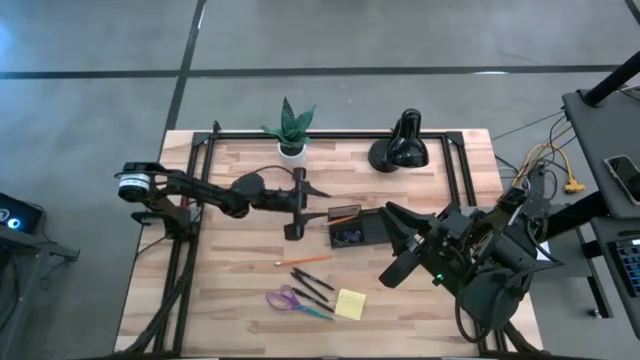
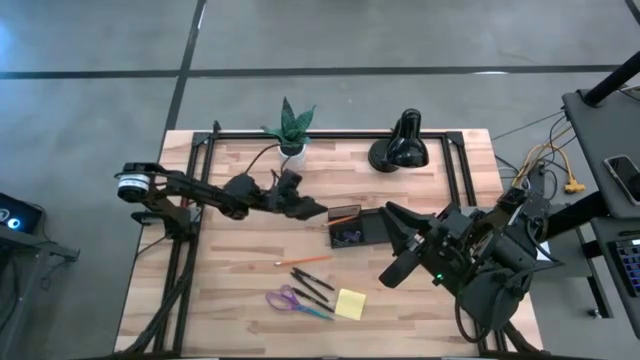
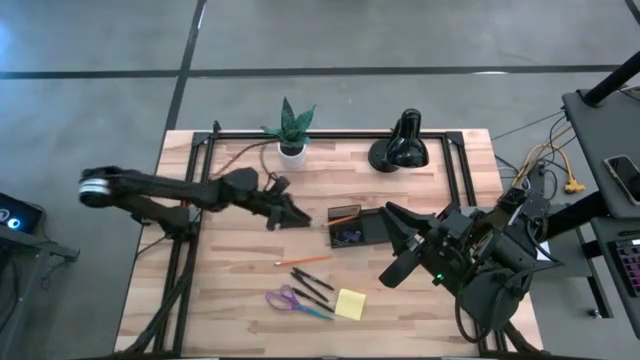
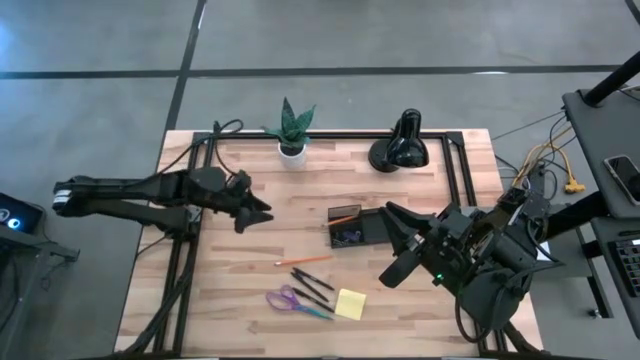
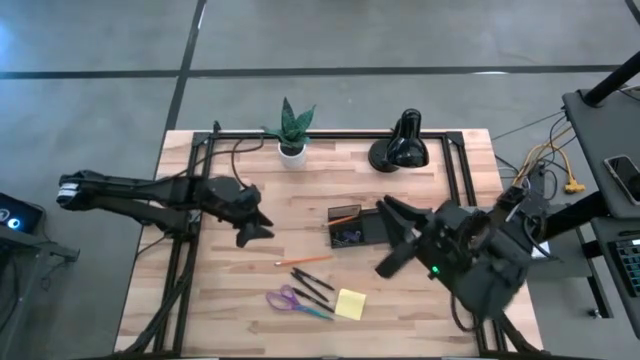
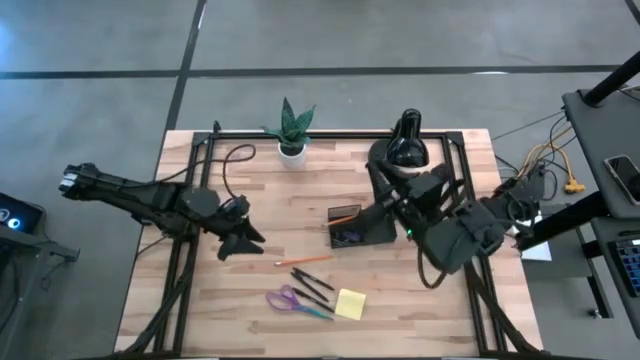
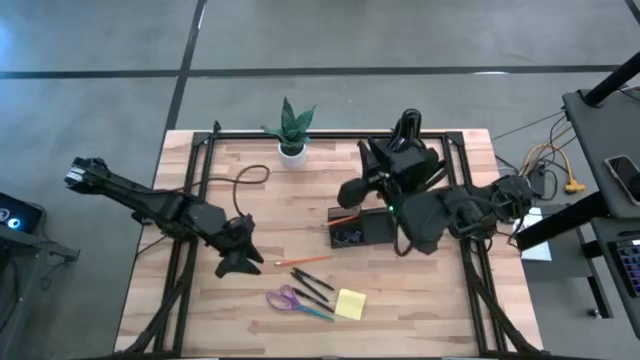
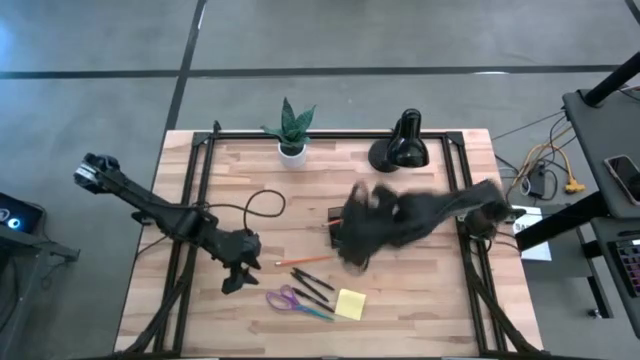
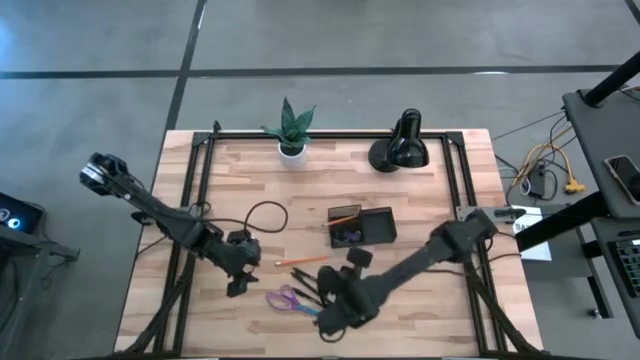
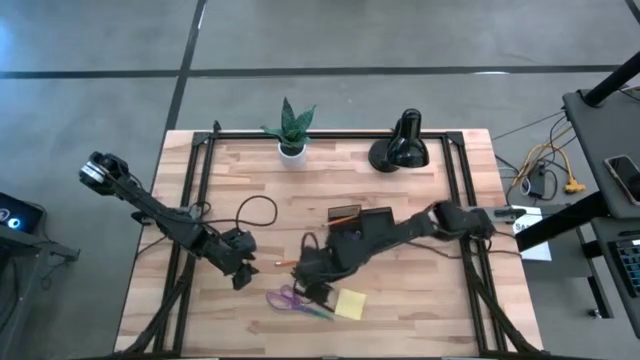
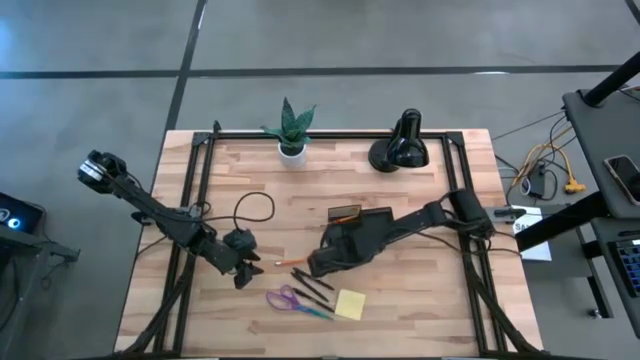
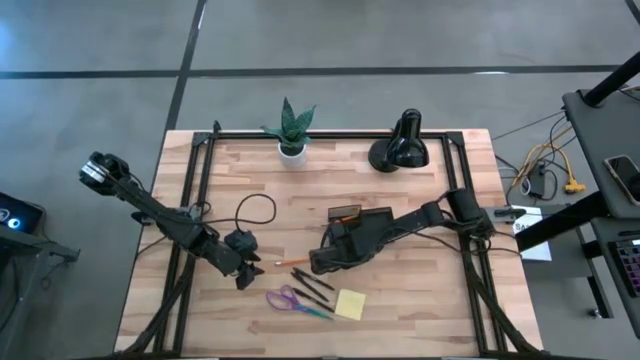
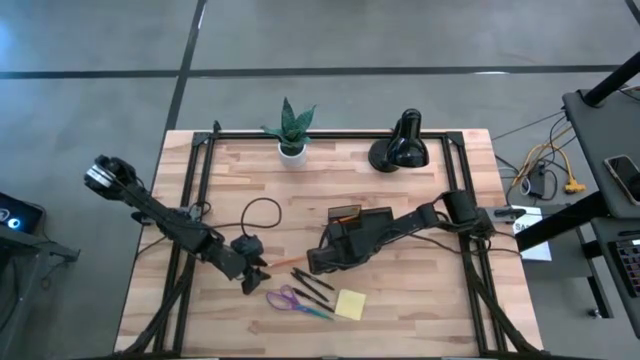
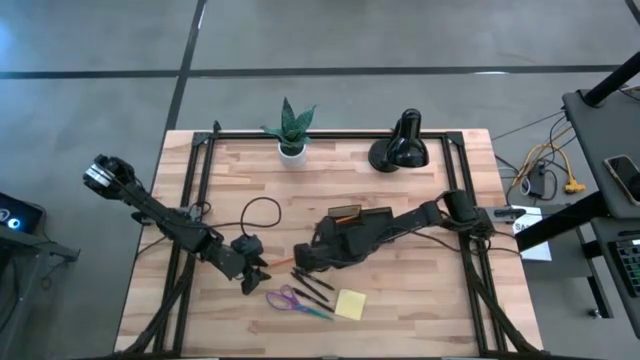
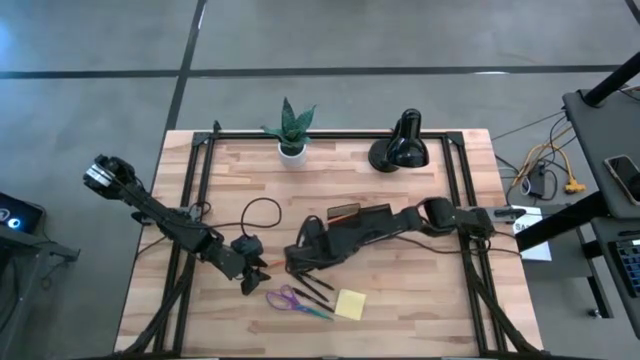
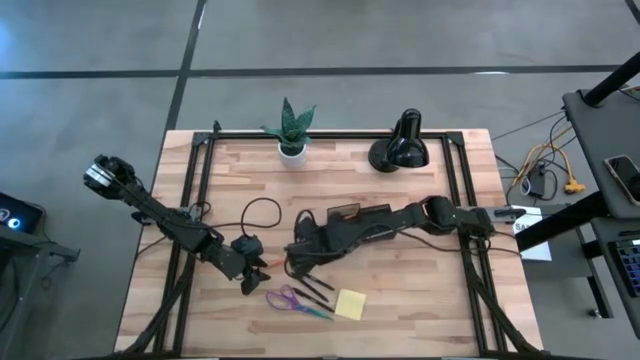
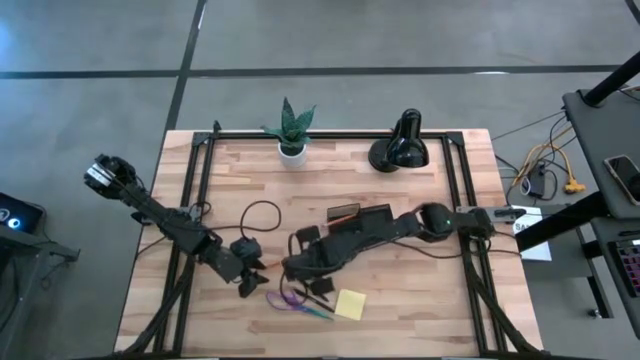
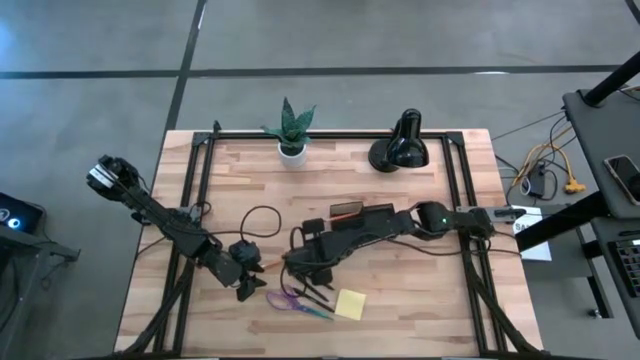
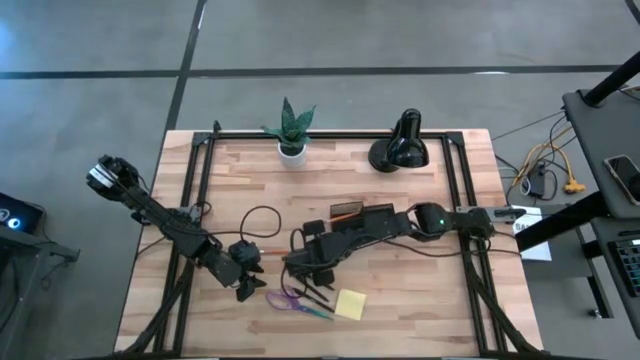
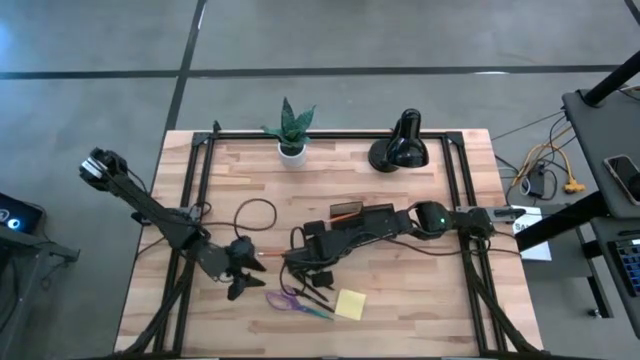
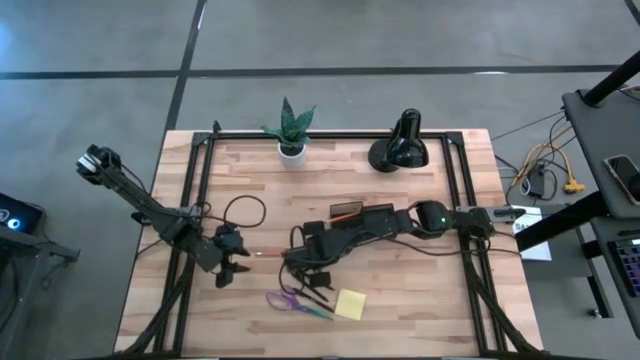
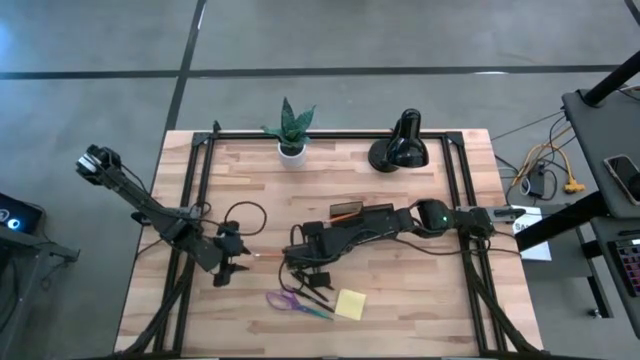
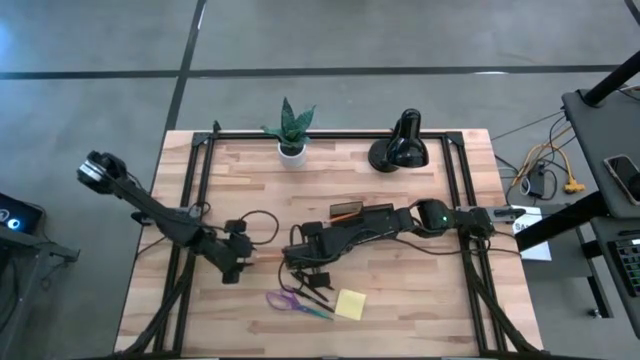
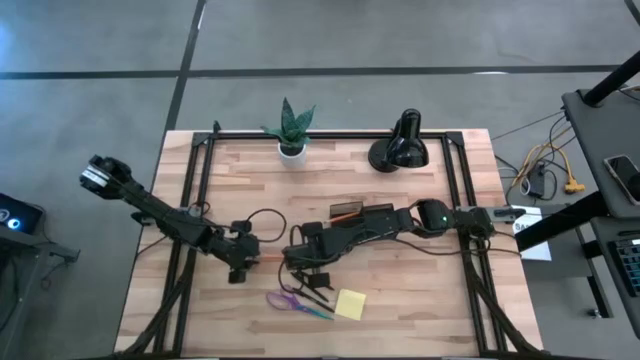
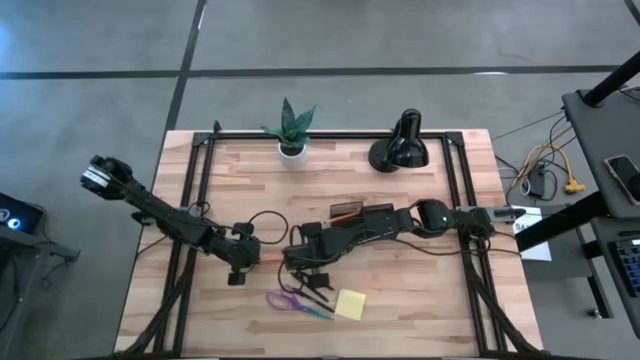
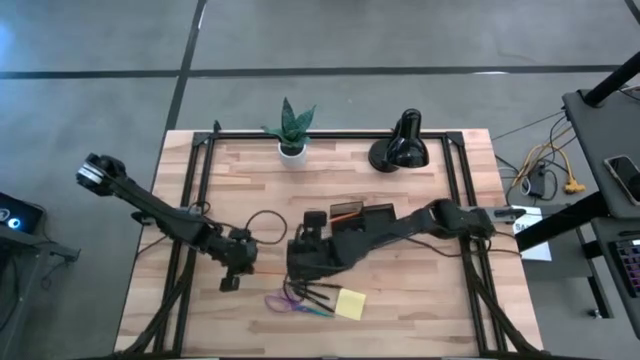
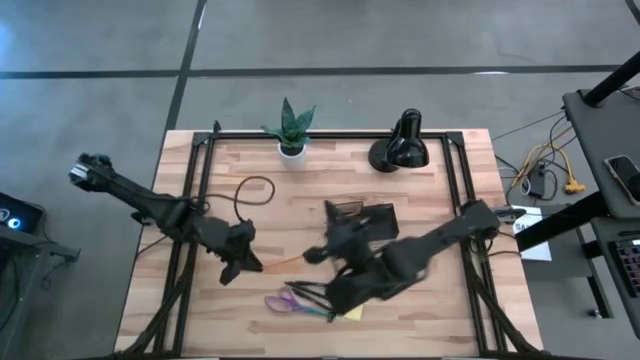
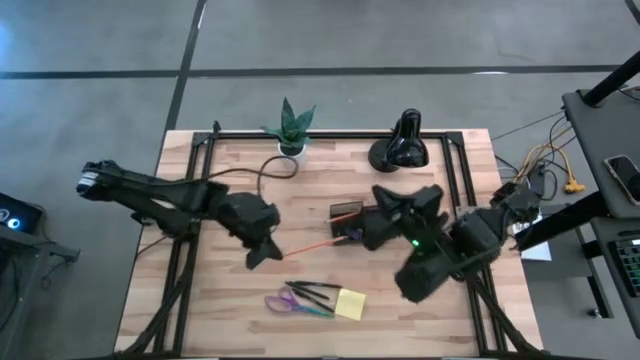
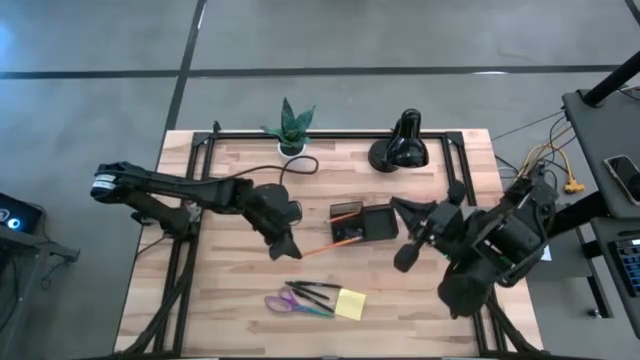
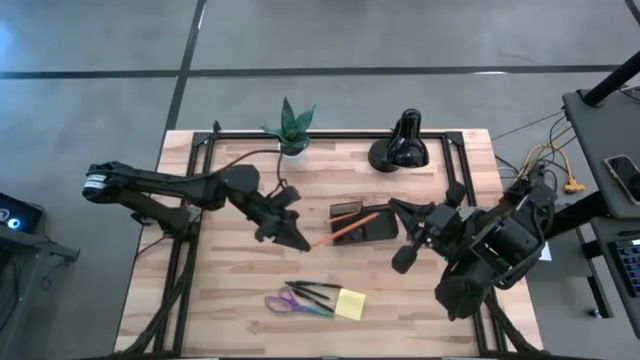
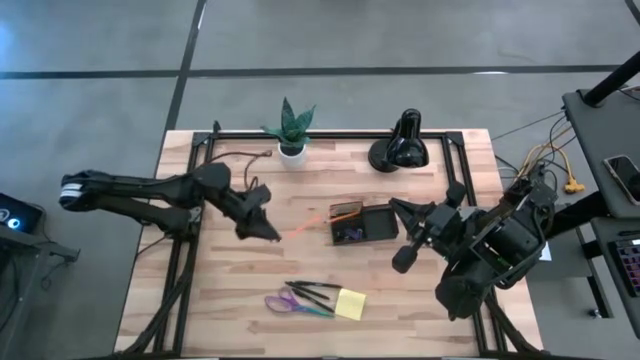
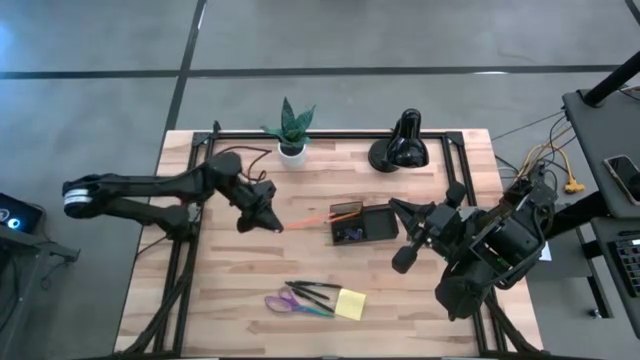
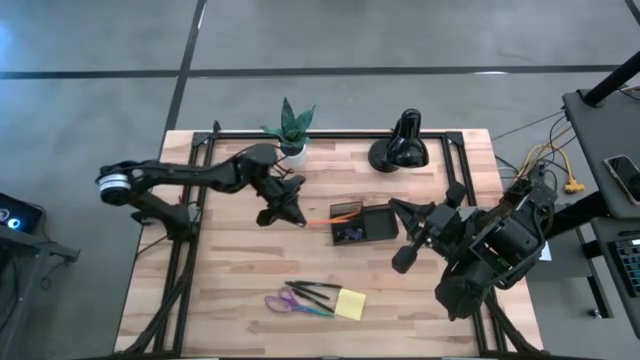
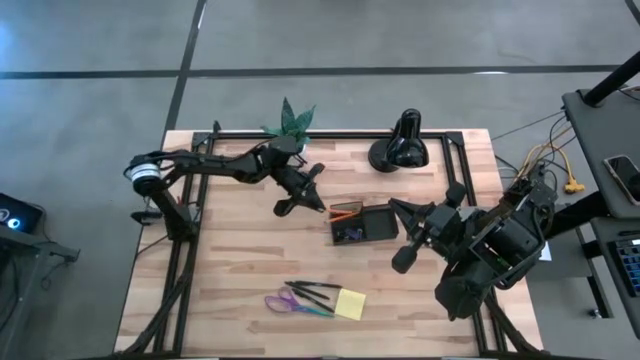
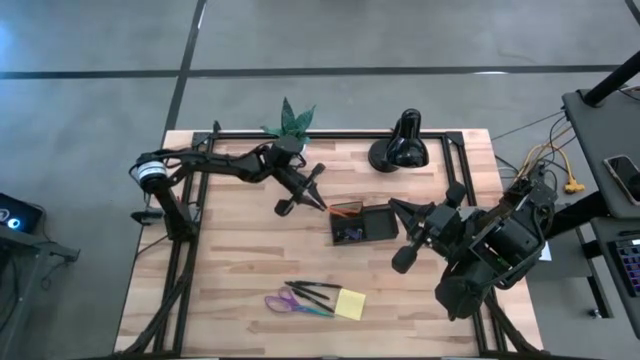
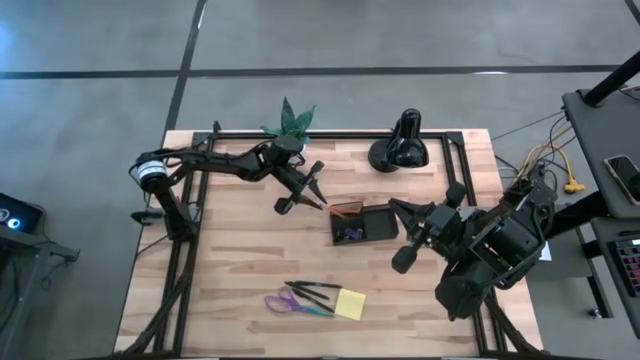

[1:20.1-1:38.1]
Task: Pick and place office supplies into organizer
Put the orange pencil into the black desk organizer

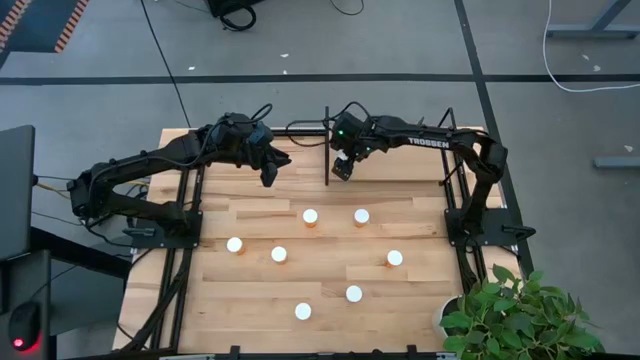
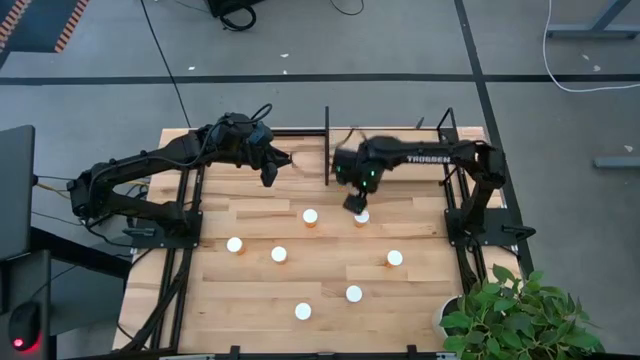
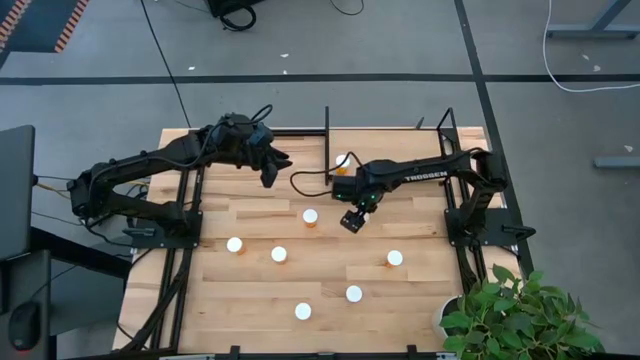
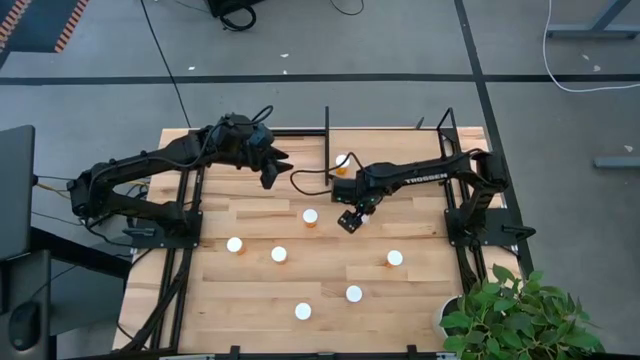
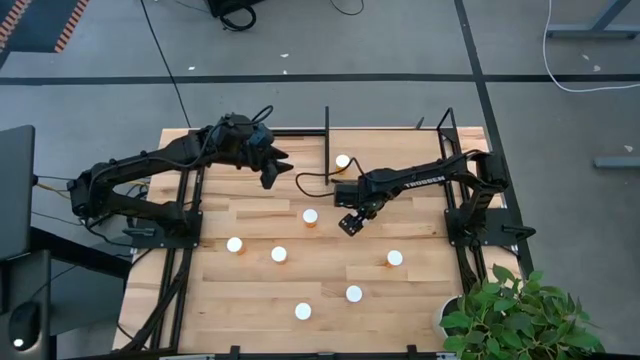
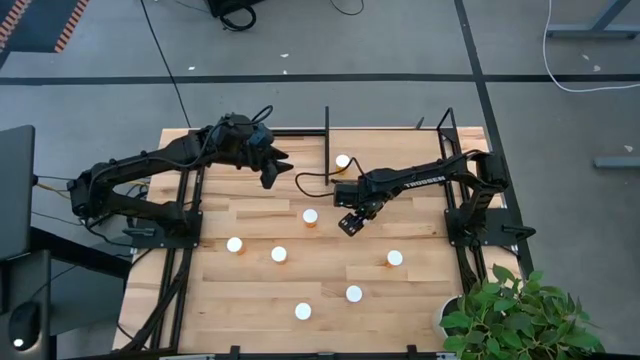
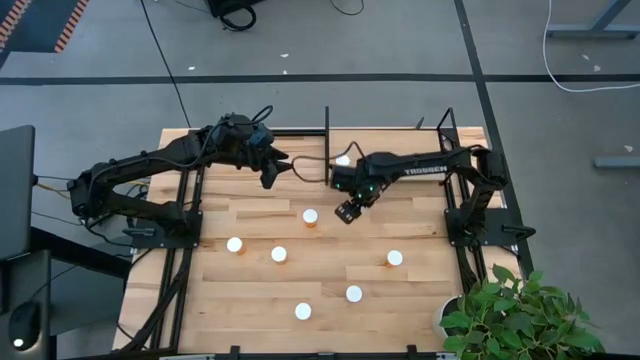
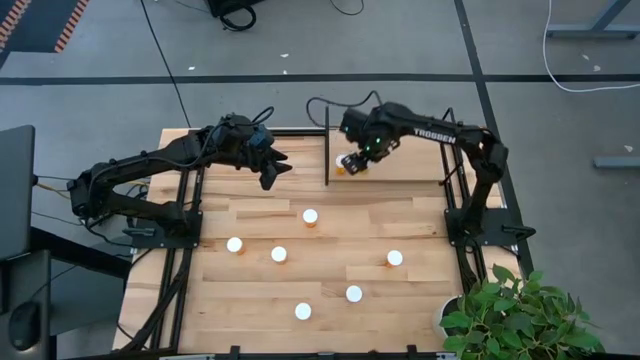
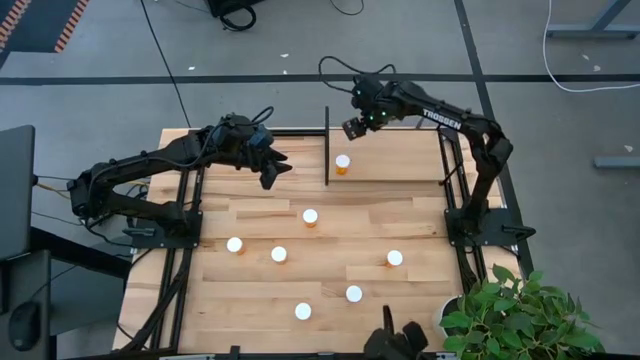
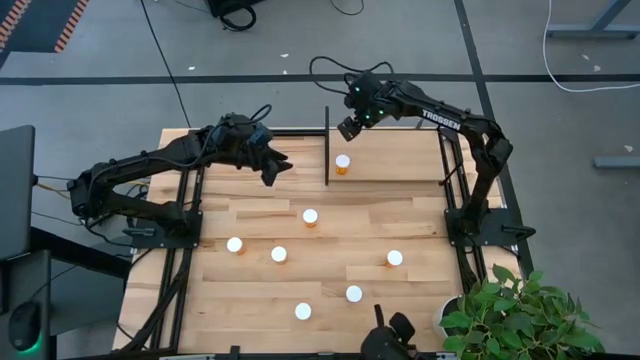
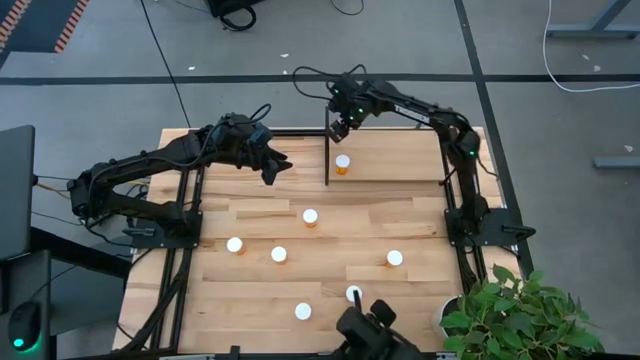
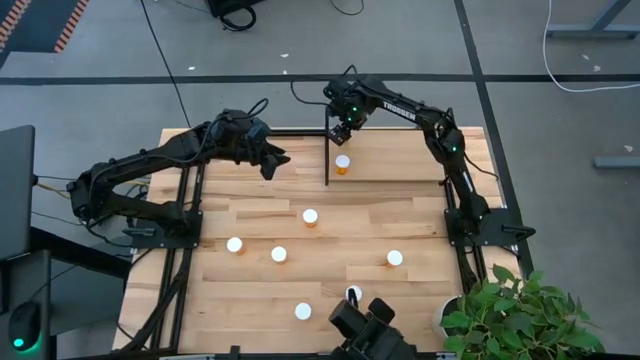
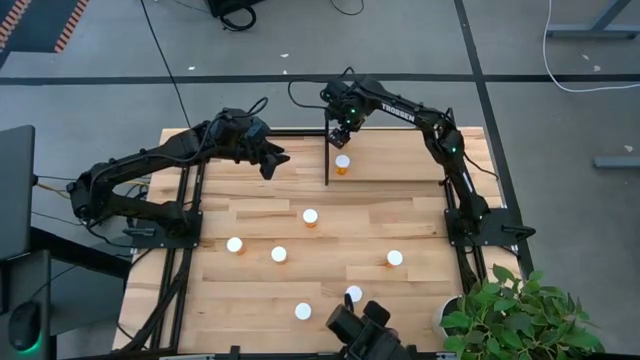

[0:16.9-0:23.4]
Task: Pick and place medicine bottles onto shelf by color
Put the orange pill bottle on the shelf
